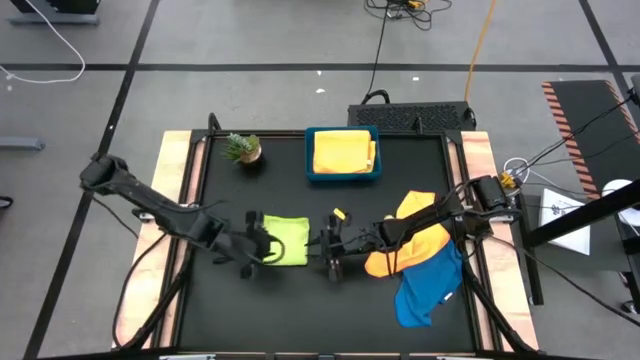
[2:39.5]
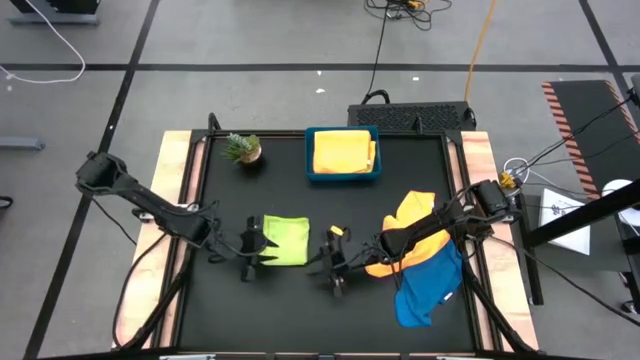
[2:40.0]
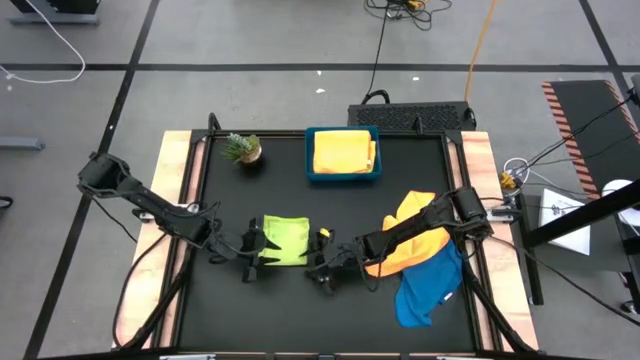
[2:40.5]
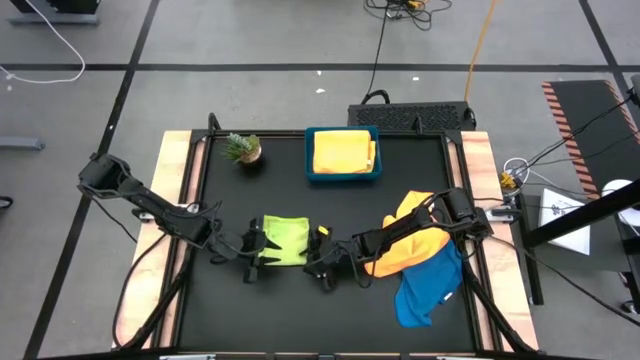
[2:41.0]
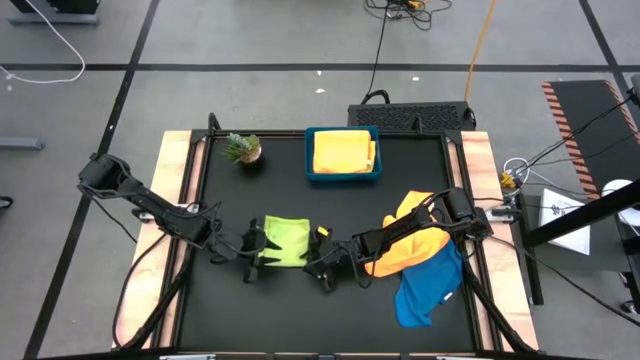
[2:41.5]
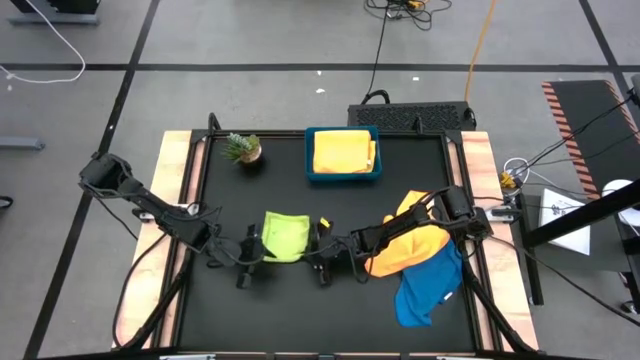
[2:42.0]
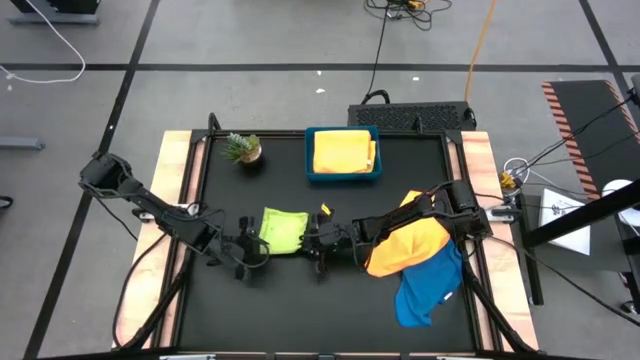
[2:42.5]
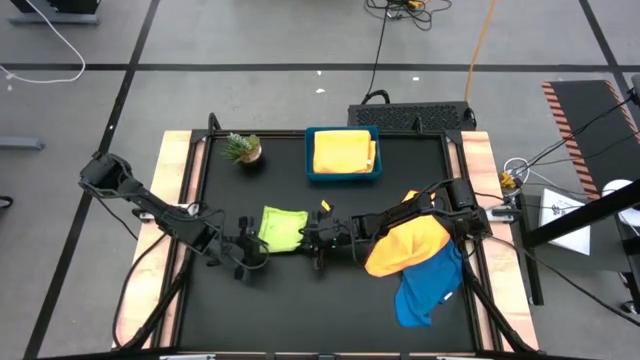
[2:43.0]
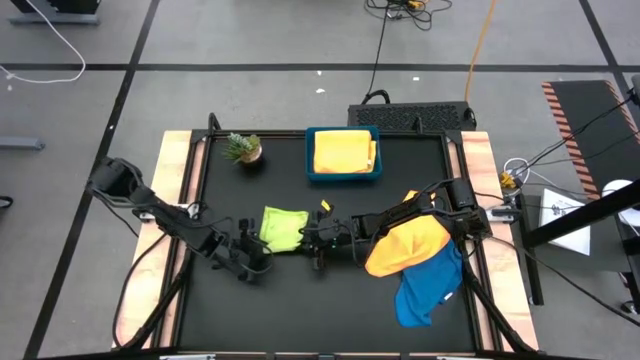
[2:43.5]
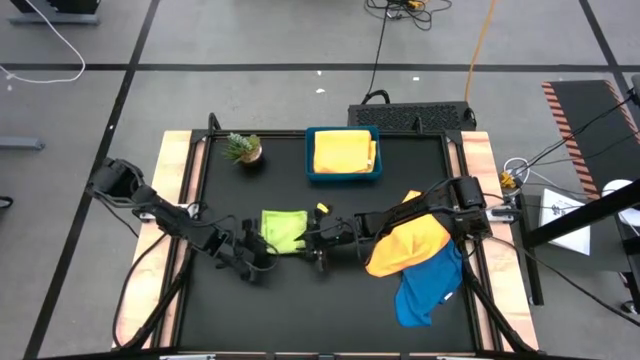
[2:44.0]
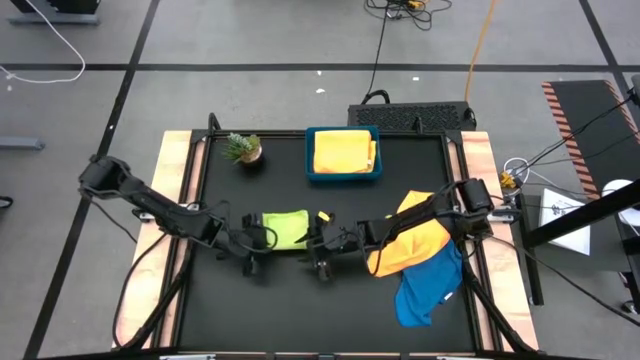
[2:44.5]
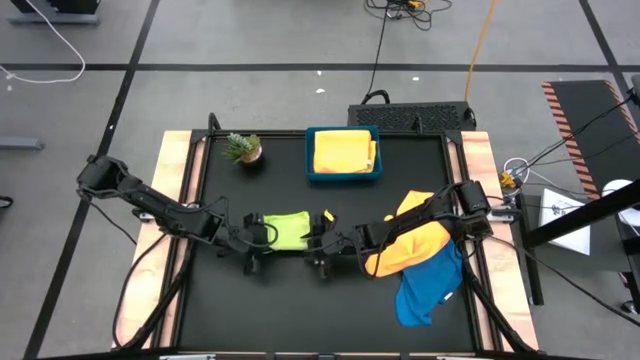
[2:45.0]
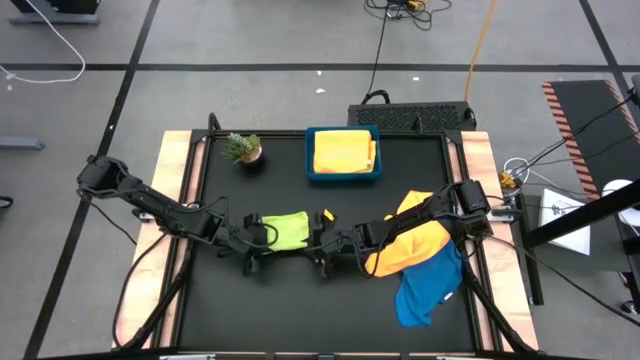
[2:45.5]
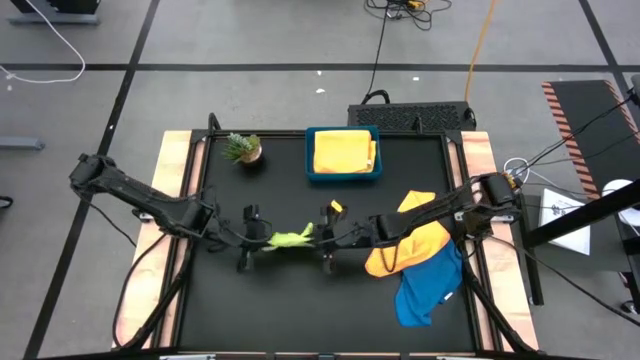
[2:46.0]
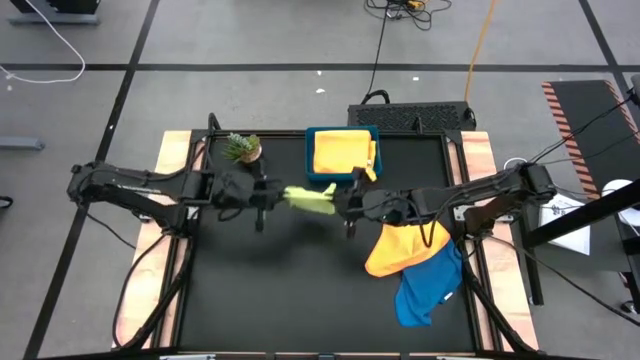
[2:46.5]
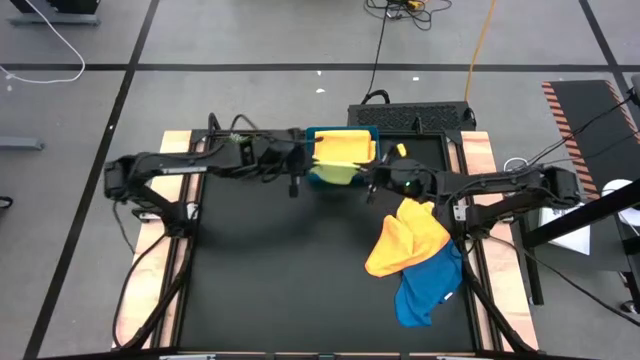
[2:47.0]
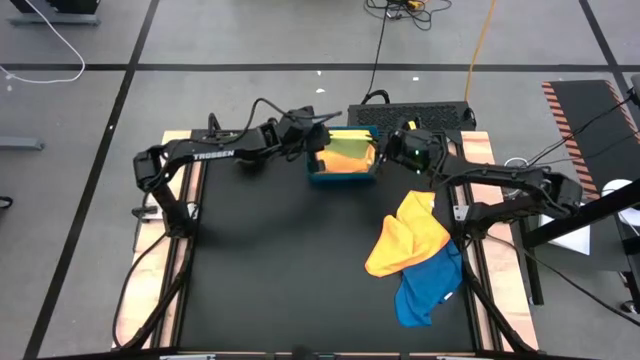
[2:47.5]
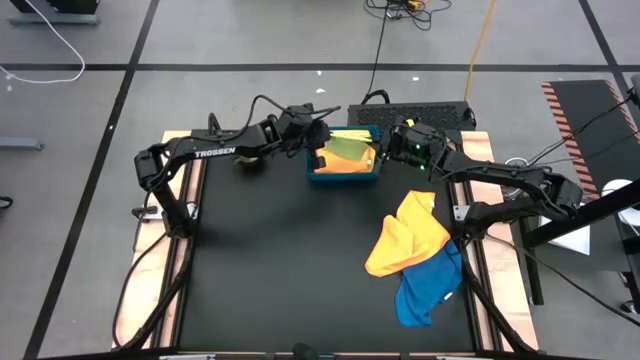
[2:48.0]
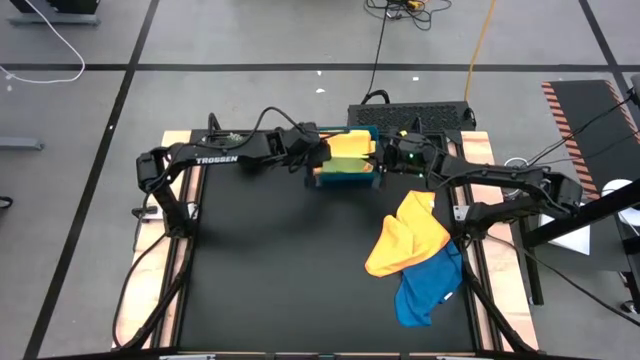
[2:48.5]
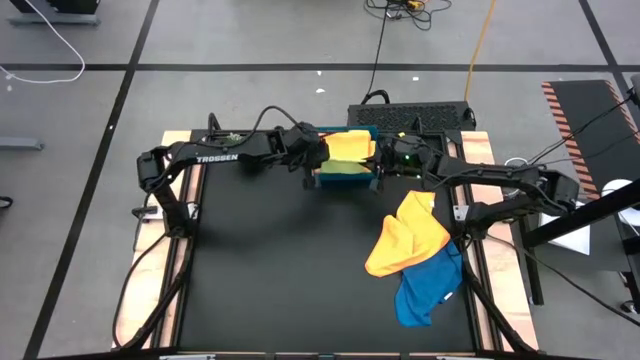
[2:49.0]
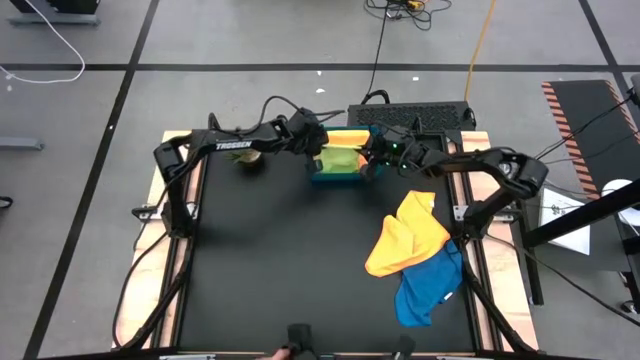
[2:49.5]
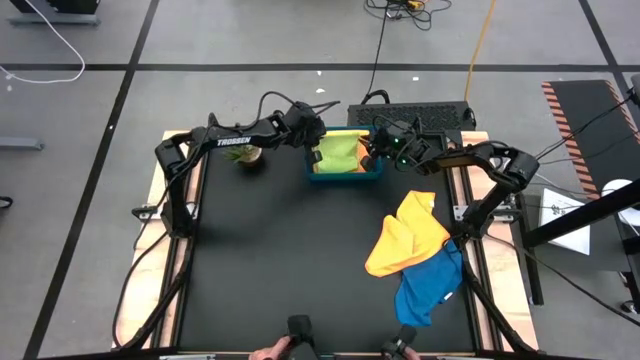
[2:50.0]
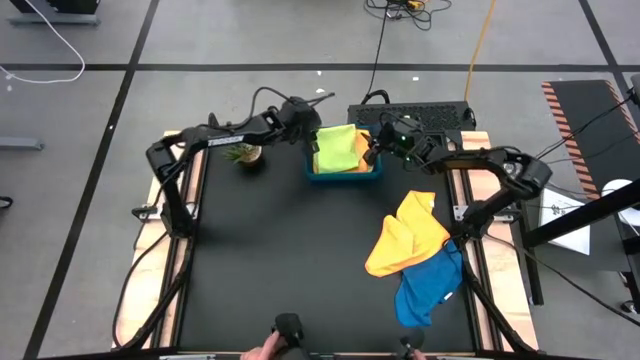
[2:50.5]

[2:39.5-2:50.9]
Task: Fold microfiber towels
Stack the green microfiber cloth on top of the orange microfiber cloth into the blue bin

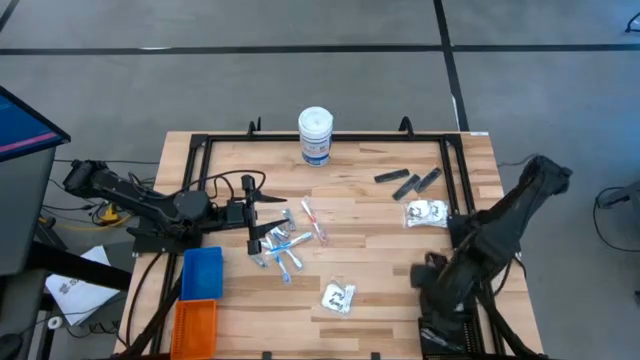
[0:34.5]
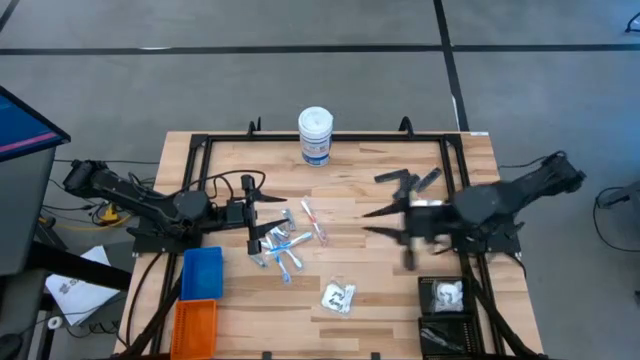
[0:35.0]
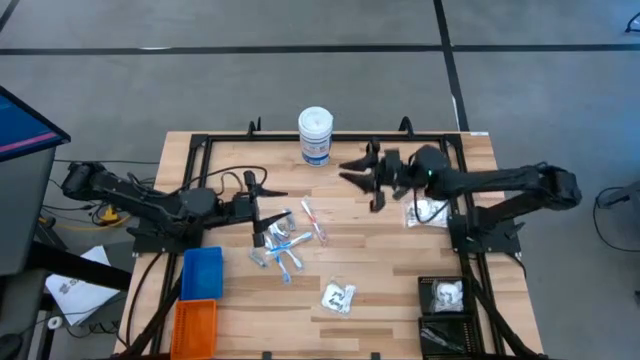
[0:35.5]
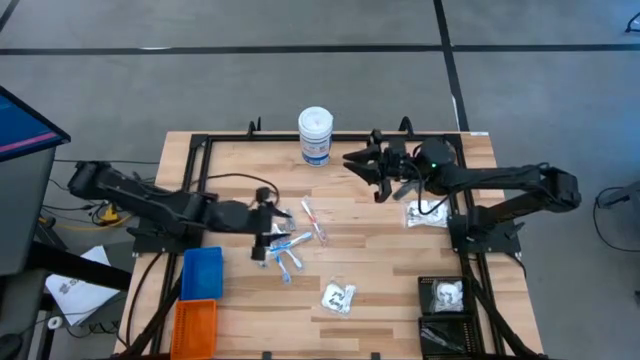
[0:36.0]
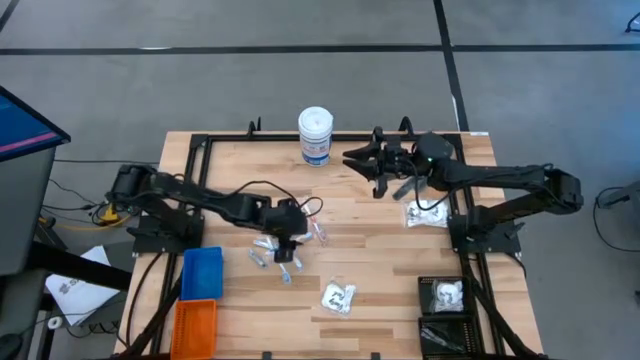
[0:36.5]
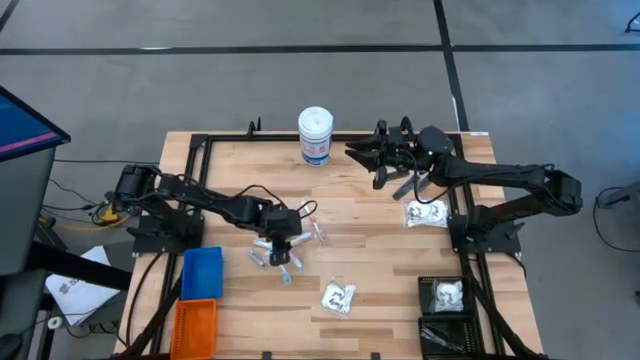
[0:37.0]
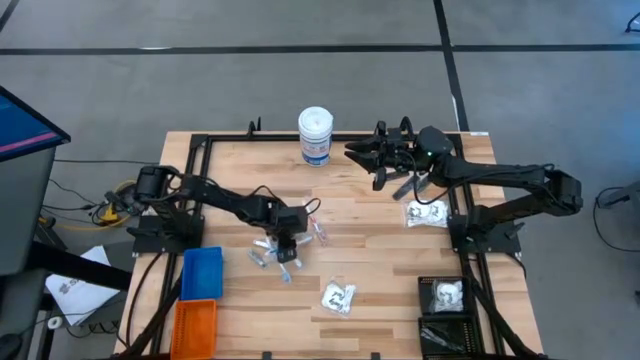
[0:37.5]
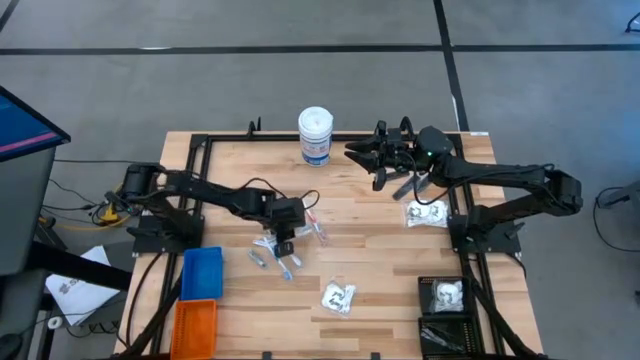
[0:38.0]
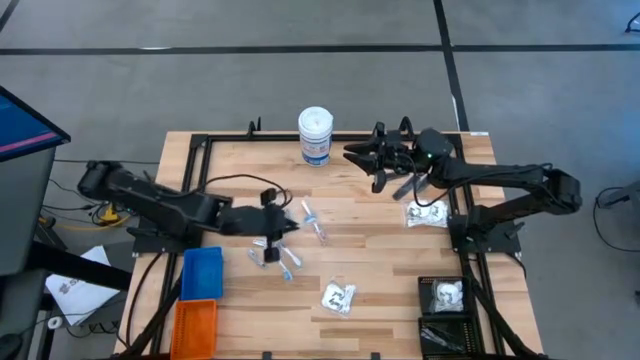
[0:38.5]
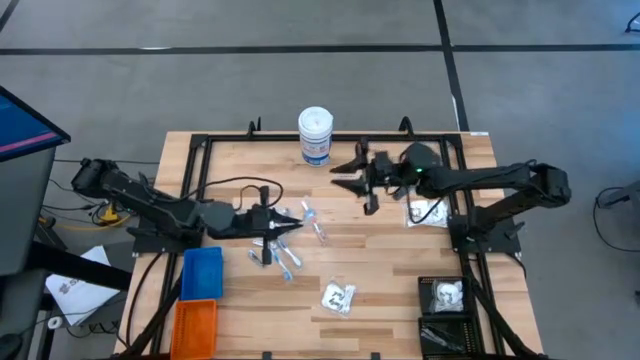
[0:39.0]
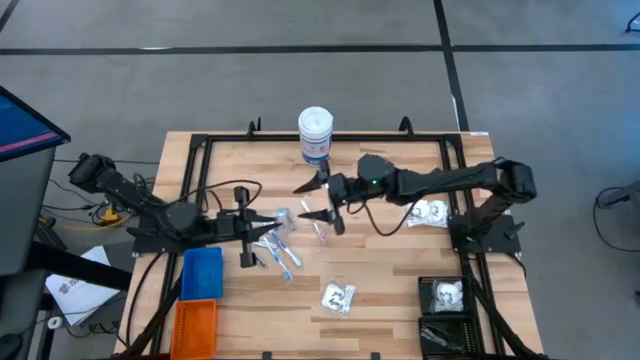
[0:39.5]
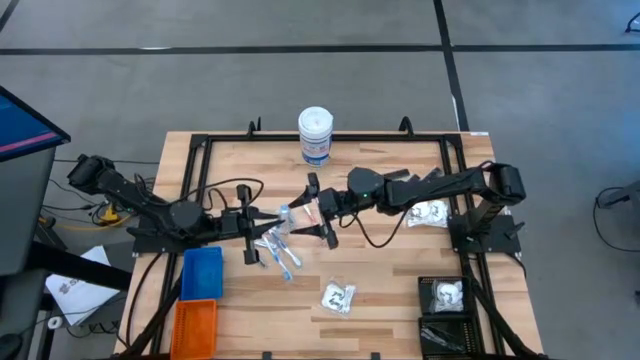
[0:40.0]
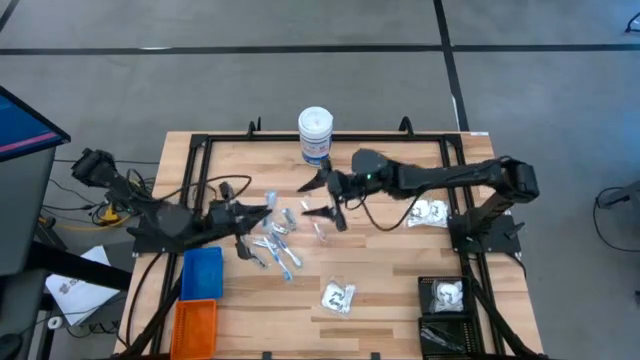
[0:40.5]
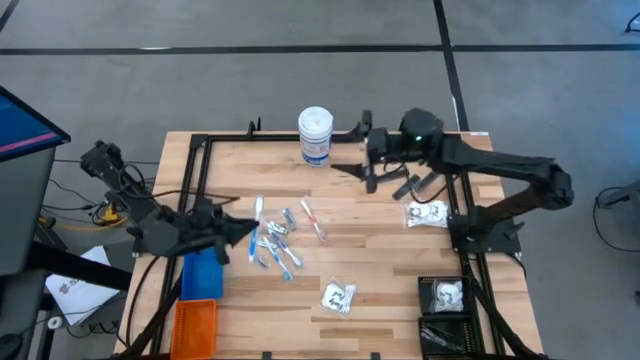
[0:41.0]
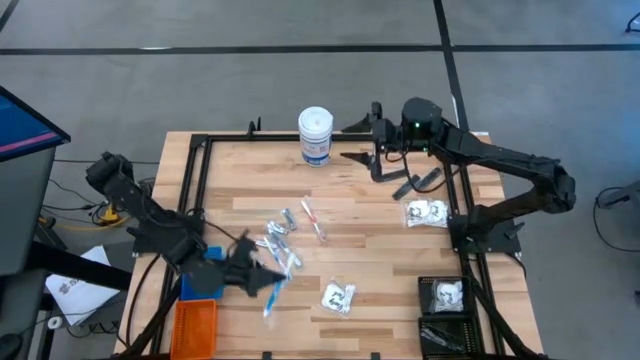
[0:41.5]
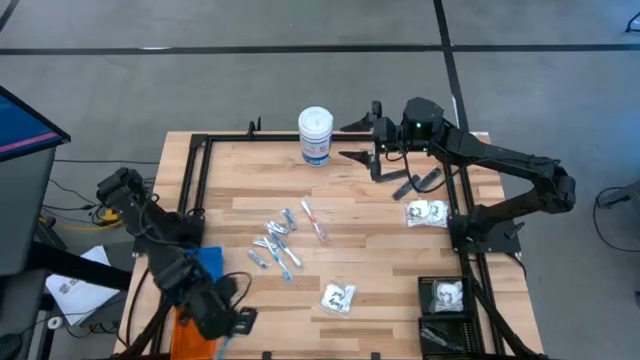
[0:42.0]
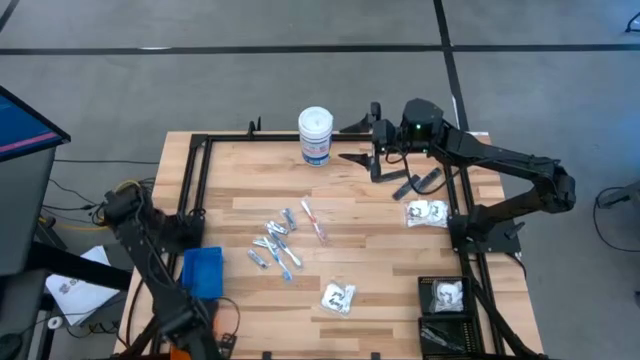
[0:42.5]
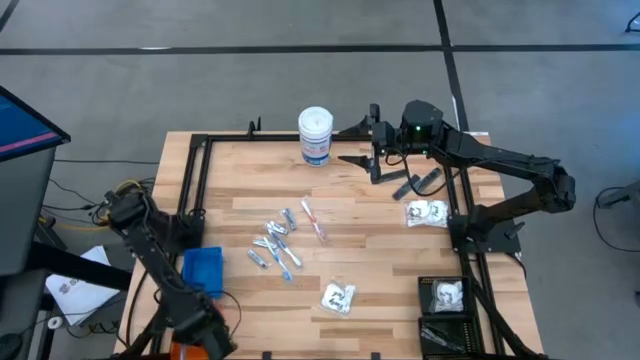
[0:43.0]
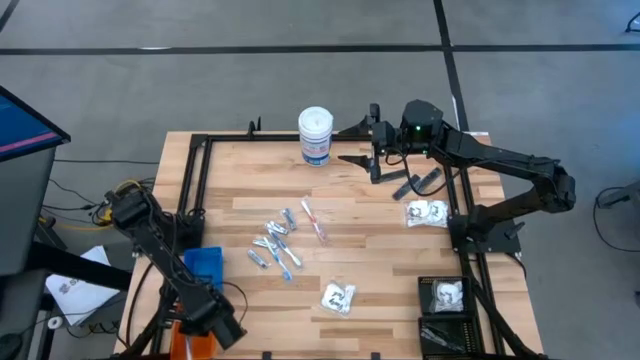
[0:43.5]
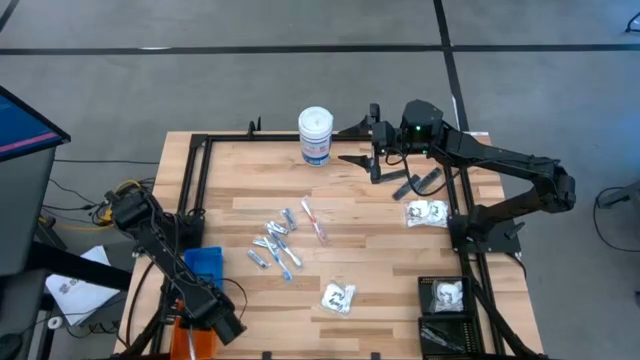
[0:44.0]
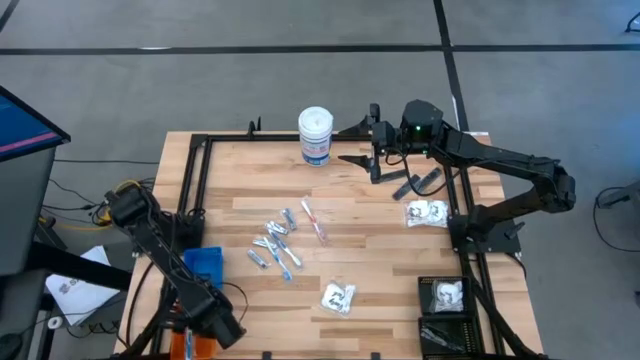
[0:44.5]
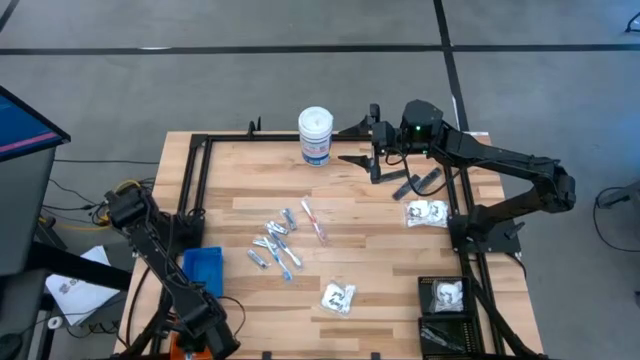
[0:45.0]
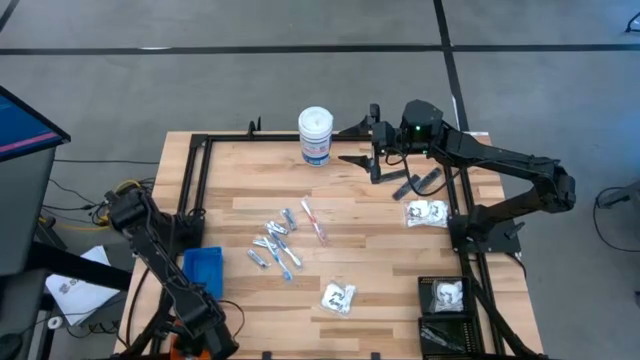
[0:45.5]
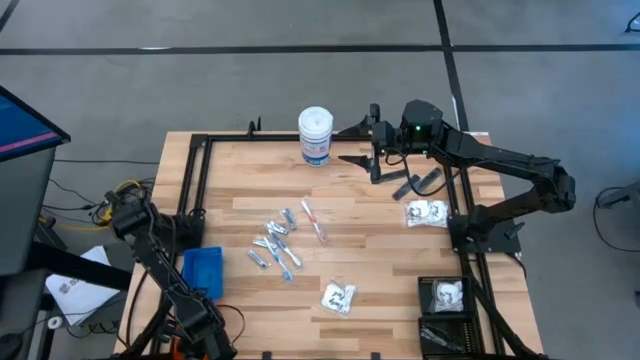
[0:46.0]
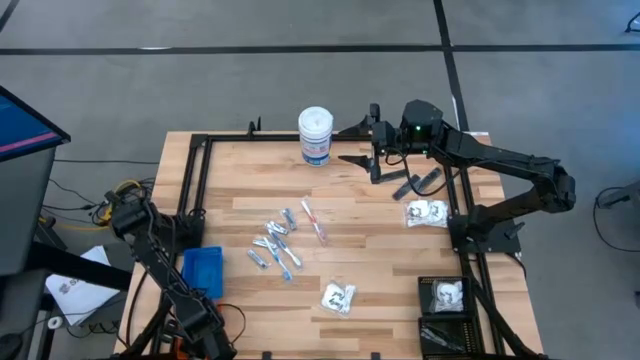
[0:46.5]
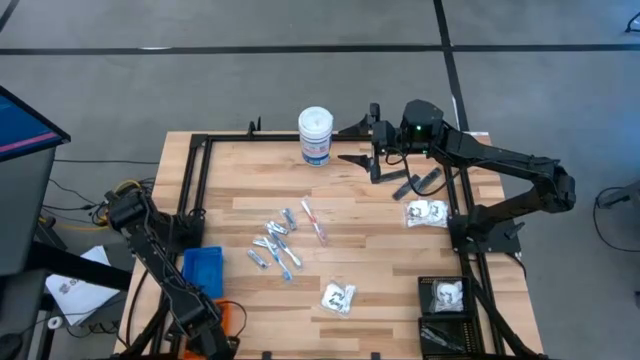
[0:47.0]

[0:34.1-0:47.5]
Task: Pick & Place Travel size toiletries
Put the blue toothbrush into the orange bin
